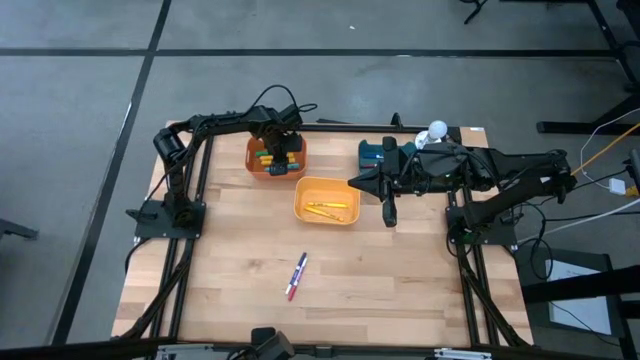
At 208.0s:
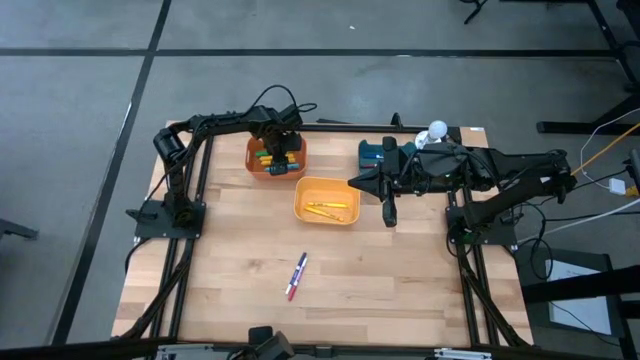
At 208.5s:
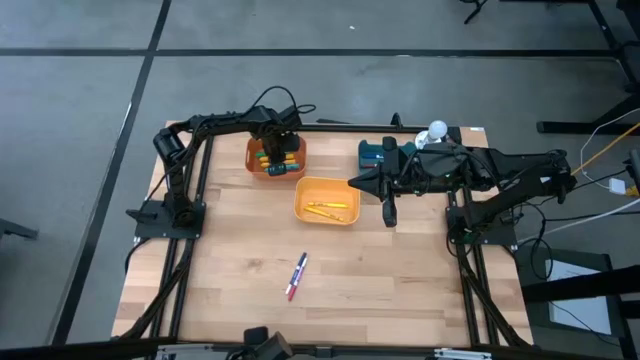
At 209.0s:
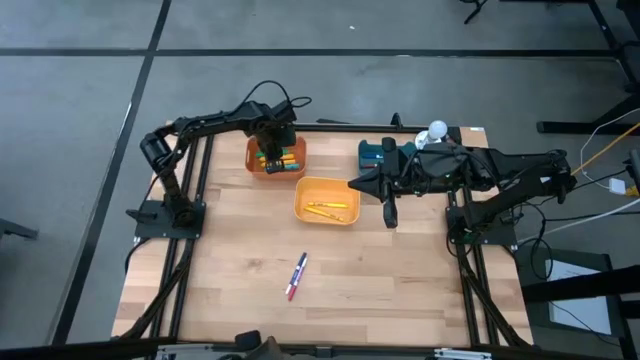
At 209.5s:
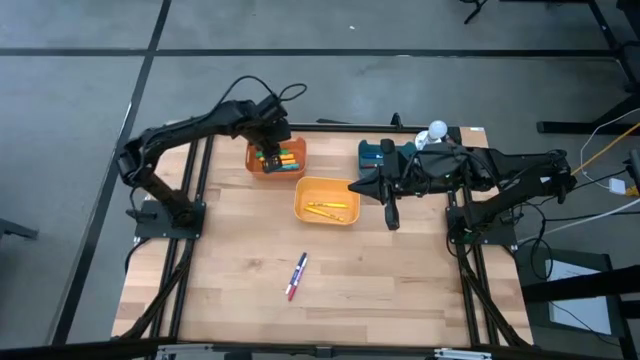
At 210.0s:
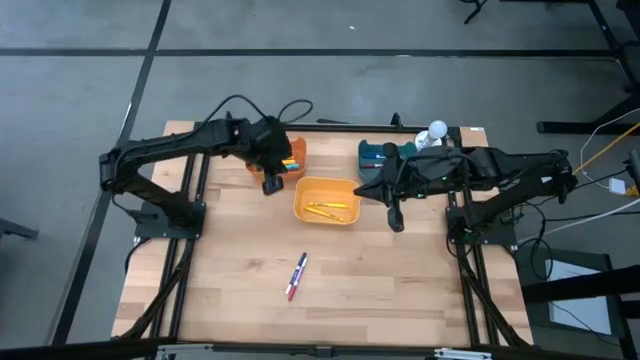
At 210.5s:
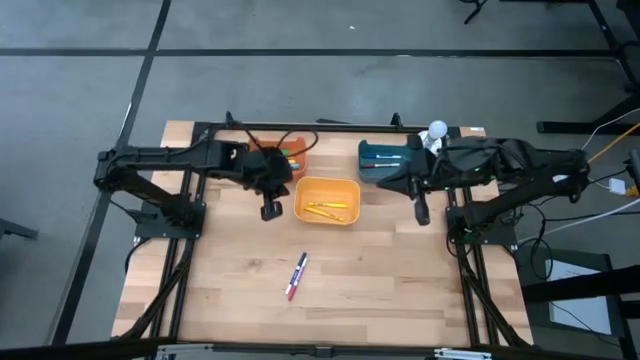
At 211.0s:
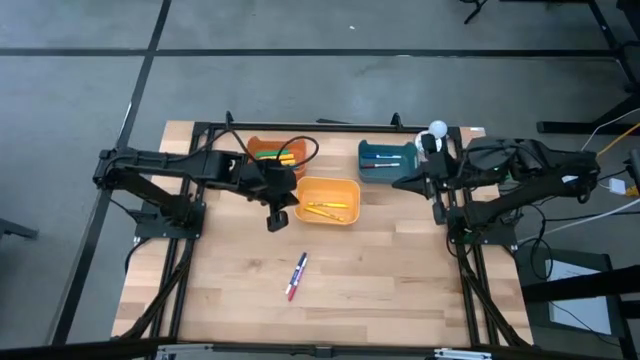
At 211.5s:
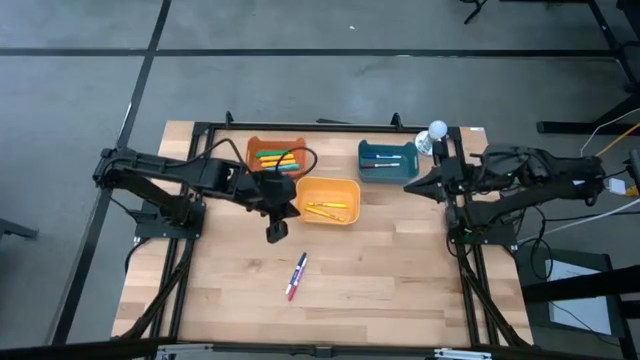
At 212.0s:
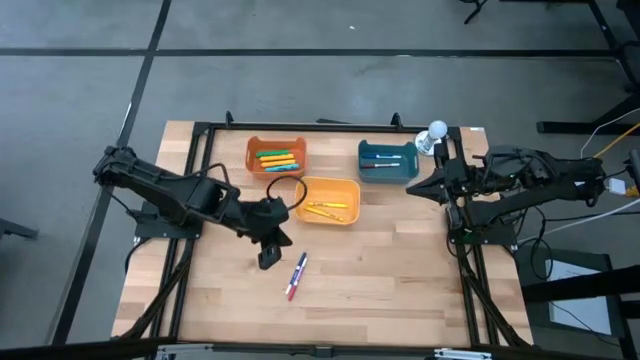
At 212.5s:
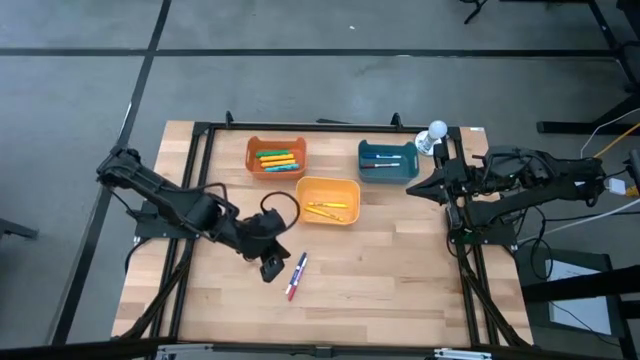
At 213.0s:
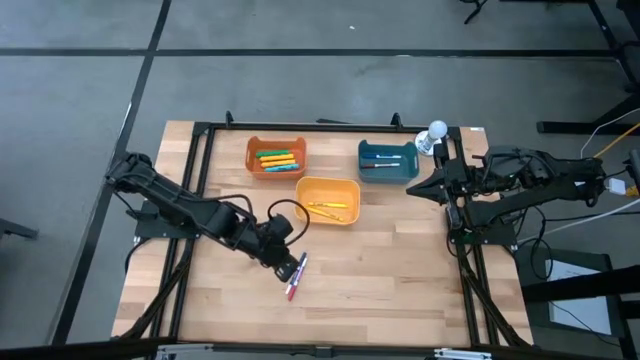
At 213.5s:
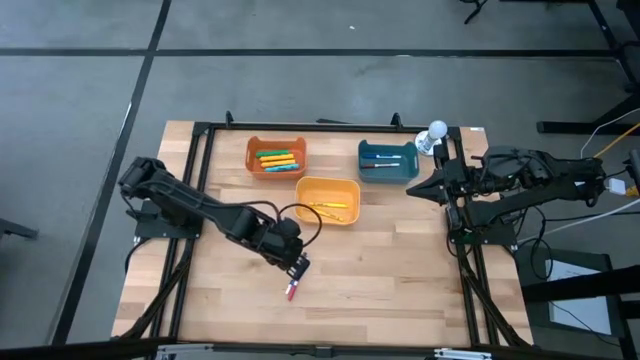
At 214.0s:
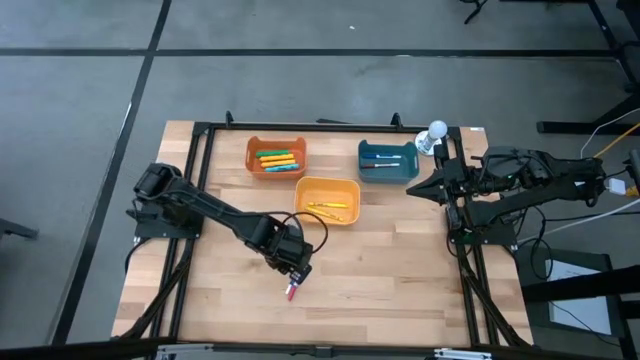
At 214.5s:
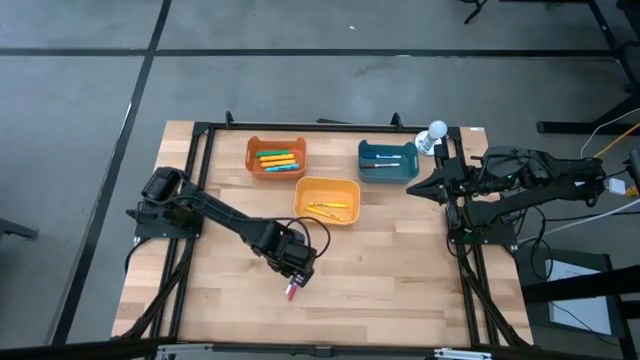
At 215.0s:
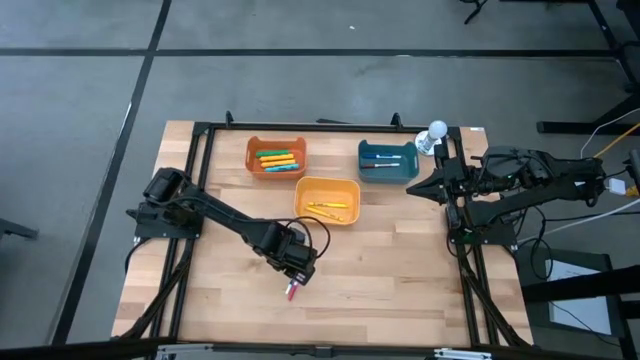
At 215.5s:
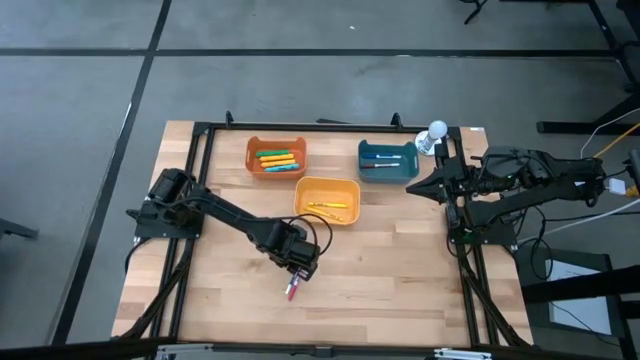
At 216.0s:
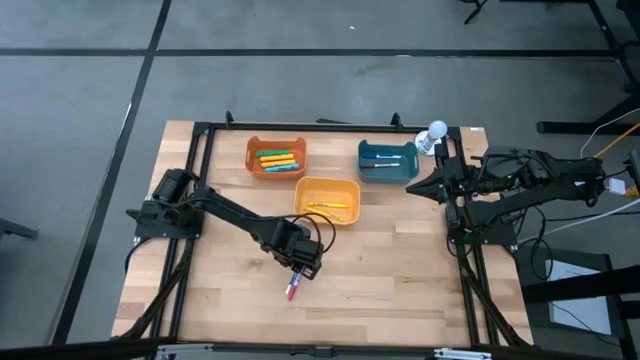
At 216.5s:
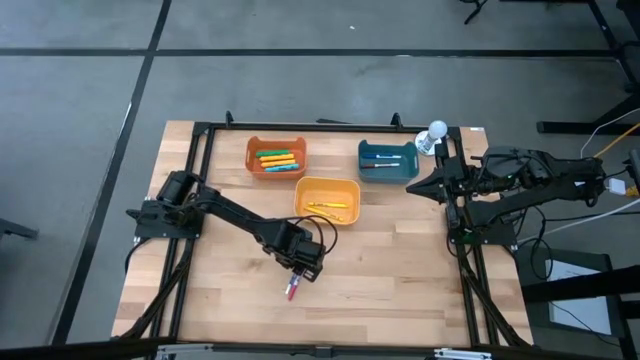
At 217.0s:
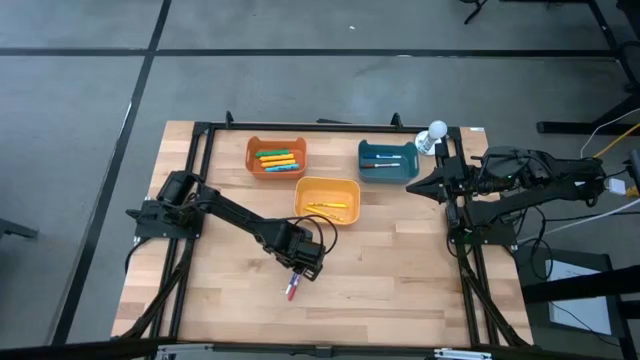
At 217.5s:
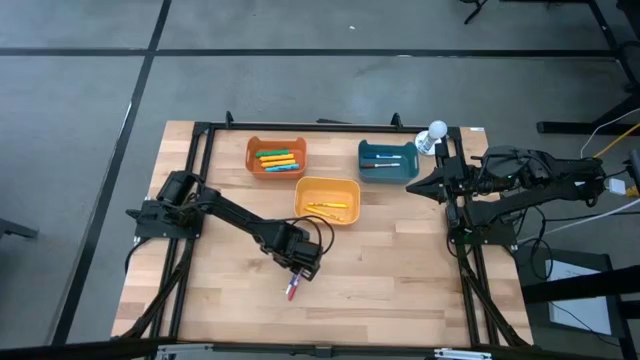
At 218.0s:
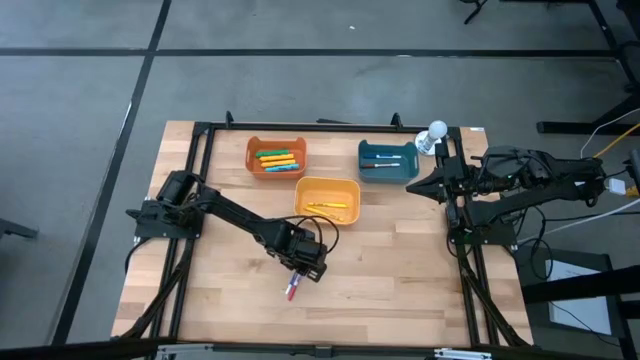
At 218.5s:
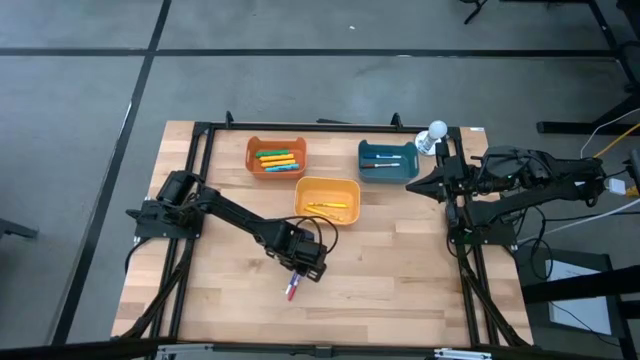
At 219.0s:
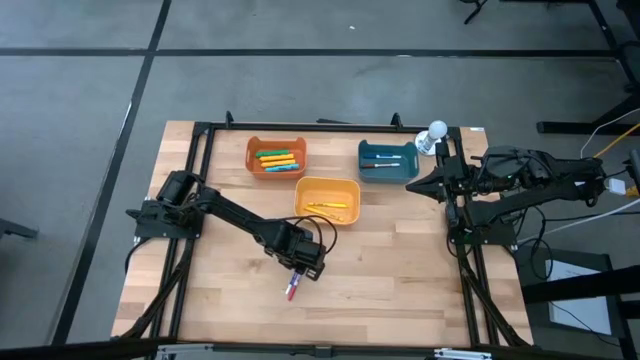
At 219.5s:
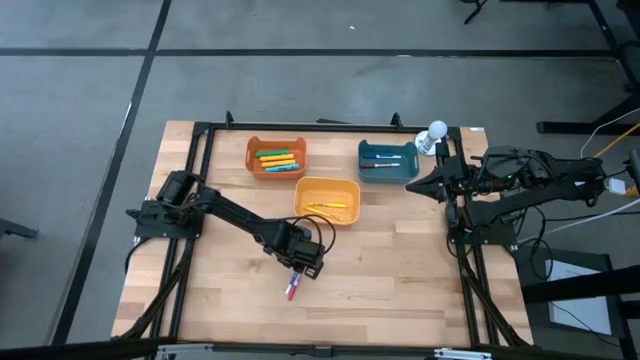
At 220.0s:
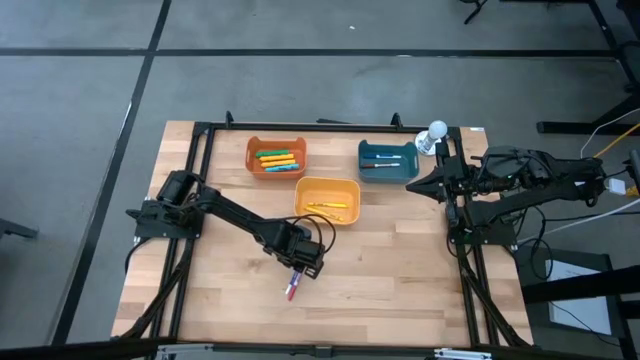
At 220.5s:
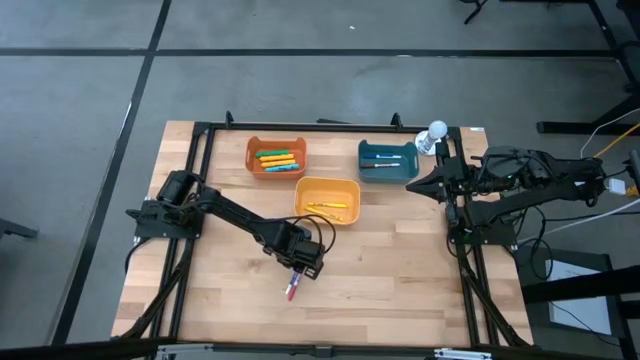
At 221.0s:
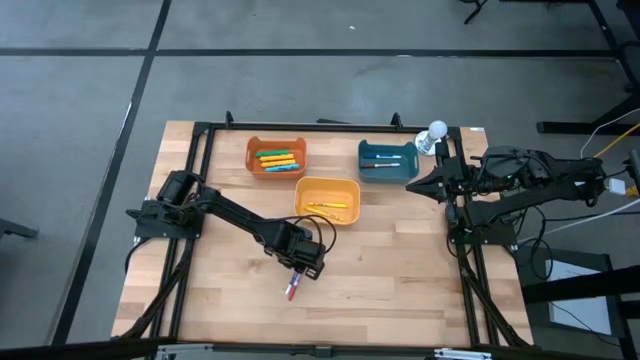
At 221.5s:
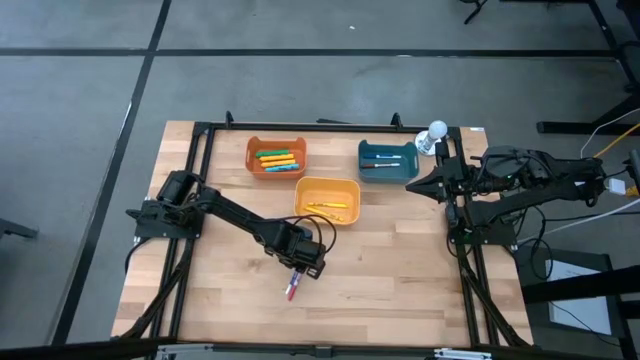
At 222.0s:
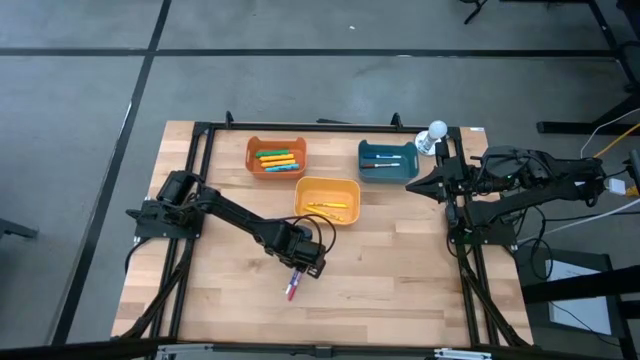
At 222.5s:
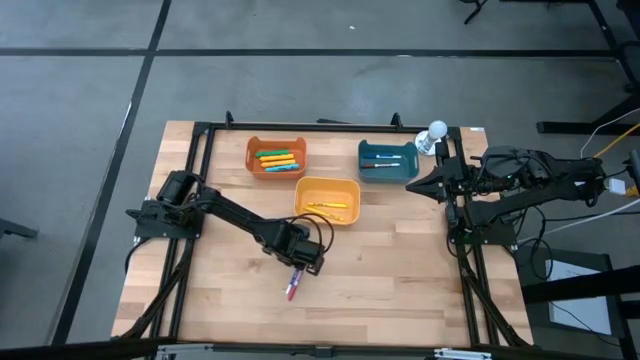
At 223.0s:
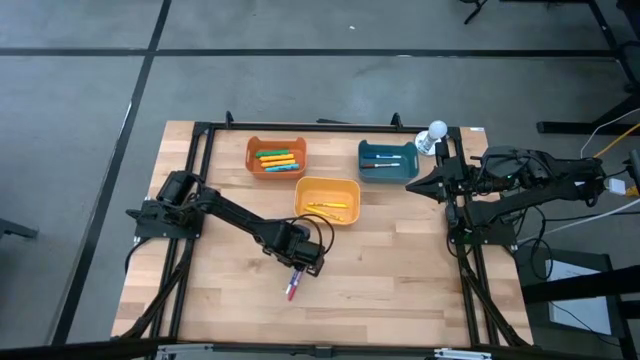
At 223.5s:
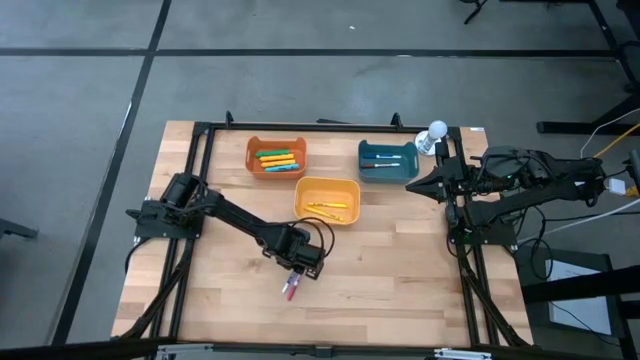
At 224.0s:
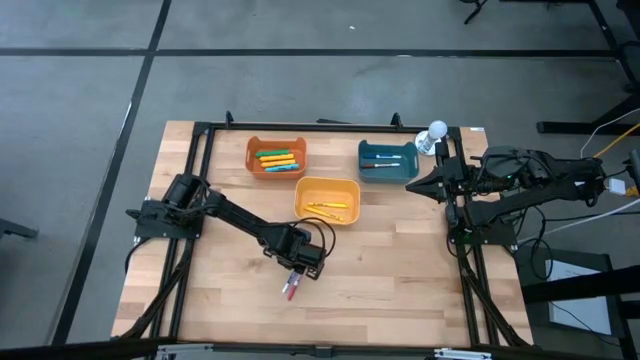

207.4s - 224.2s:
Task: Pick & Place Markers
Put the blue marker pen into the blue bin

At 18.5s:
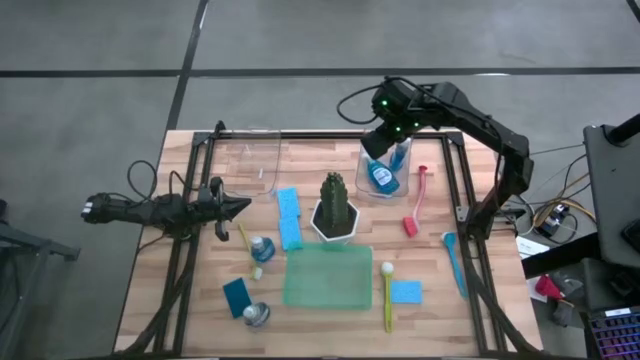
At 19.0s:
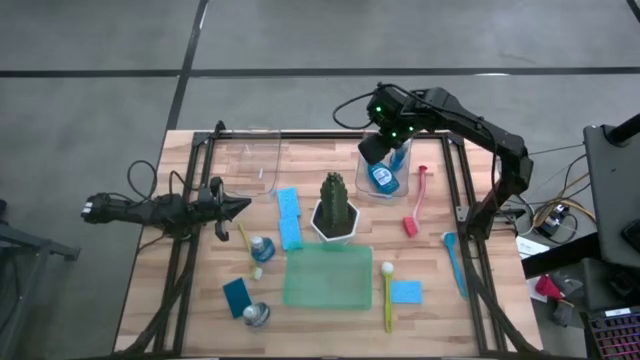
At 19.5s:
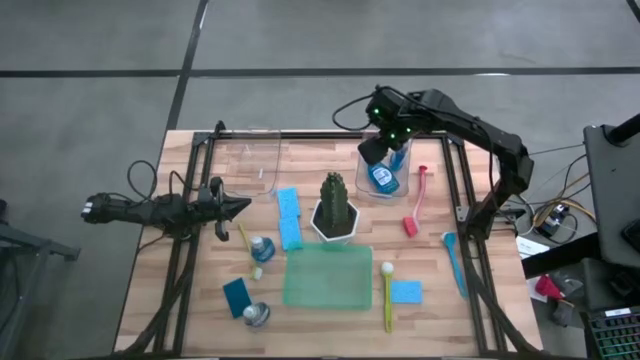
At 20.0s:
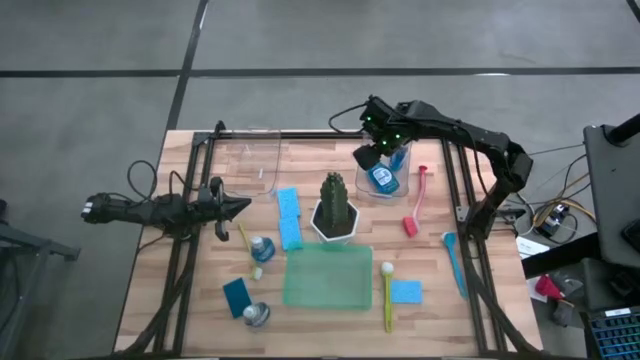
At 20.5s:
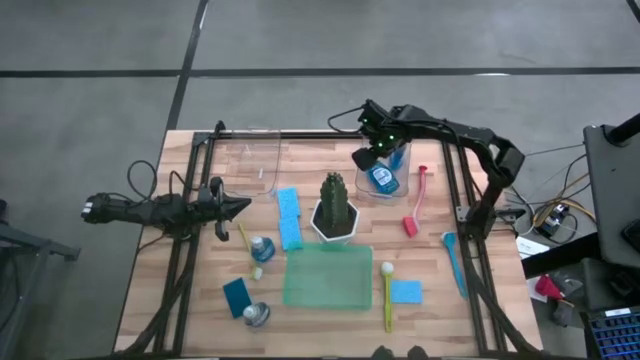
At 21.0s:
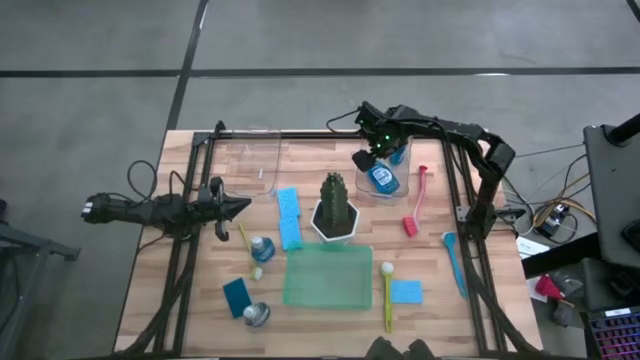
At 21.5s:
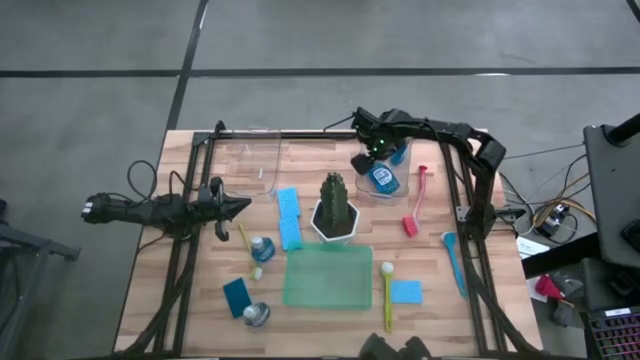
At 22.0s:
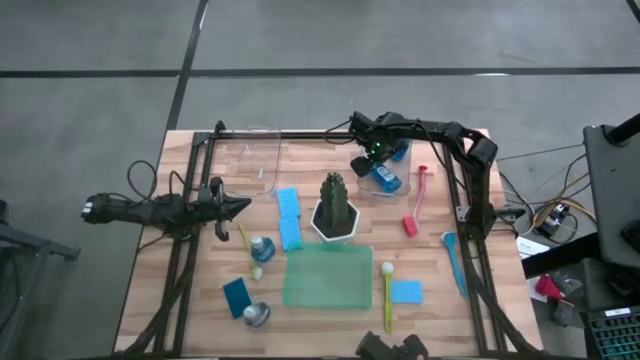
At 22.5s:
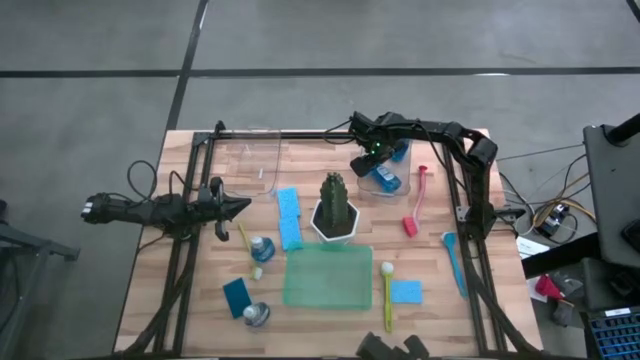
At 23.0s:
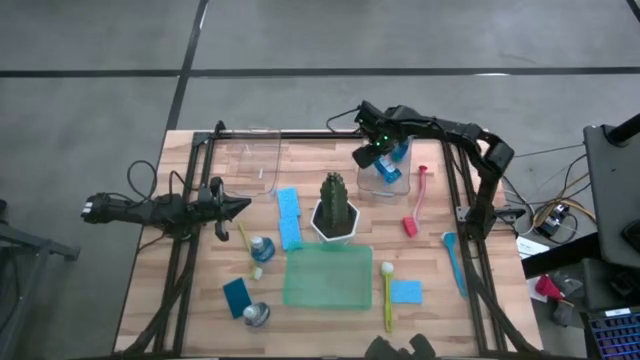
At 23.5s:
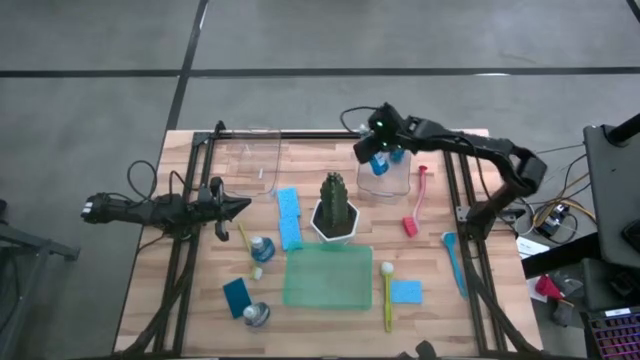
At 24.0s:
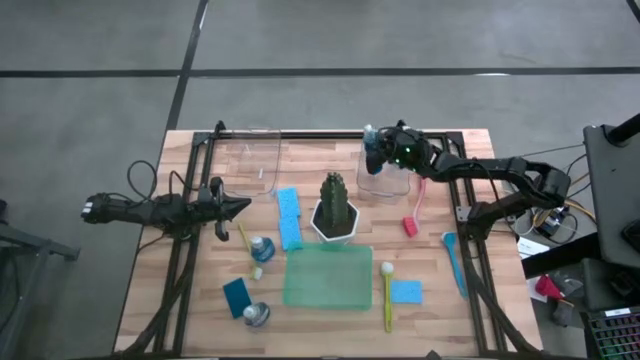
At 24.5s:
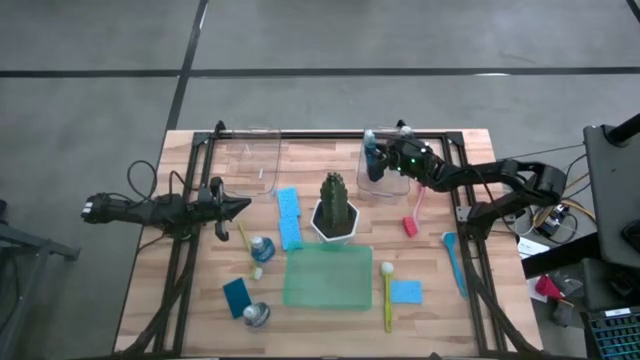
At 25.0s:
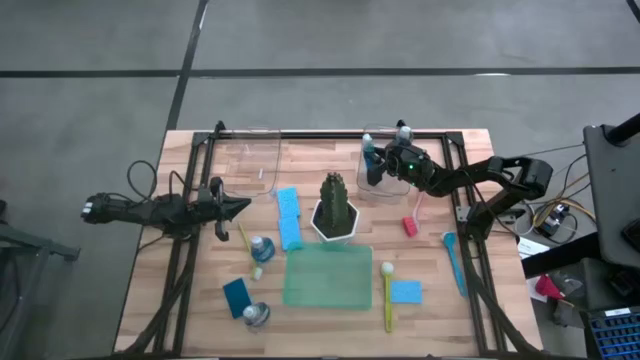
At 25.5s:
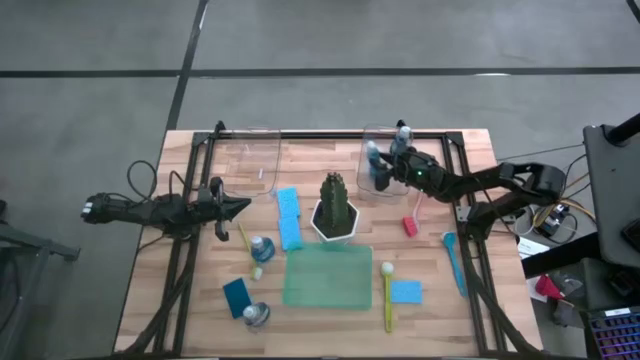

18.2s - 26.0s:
Task: Pick & Place Kitchen Sink Supplies
Put the dish soap into the right transparent bin
